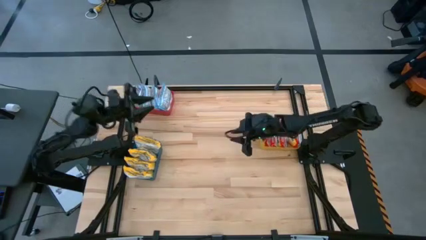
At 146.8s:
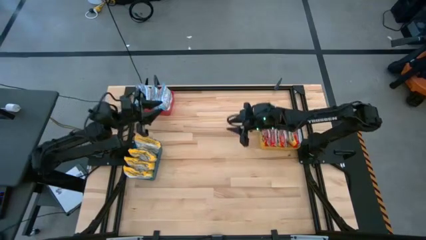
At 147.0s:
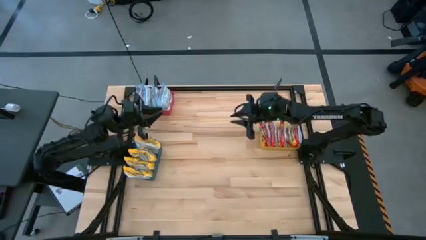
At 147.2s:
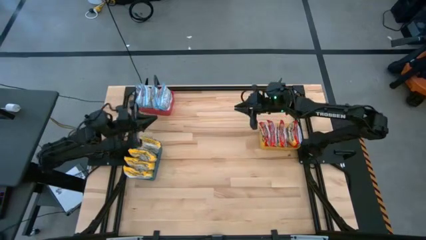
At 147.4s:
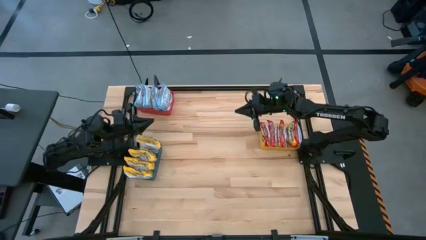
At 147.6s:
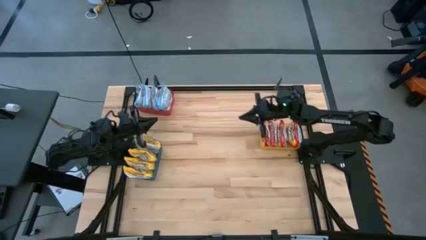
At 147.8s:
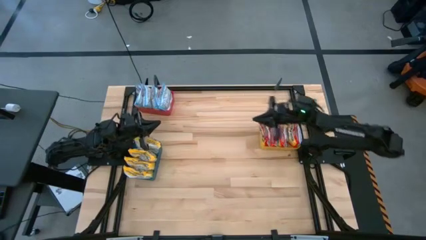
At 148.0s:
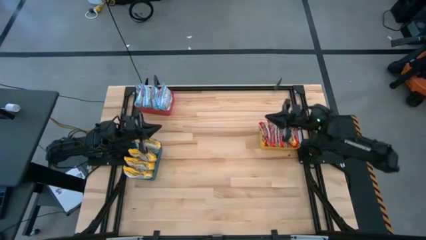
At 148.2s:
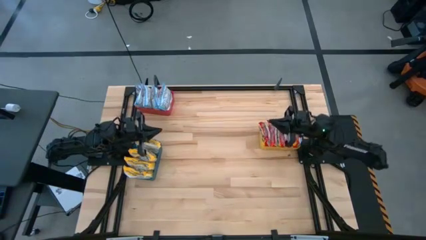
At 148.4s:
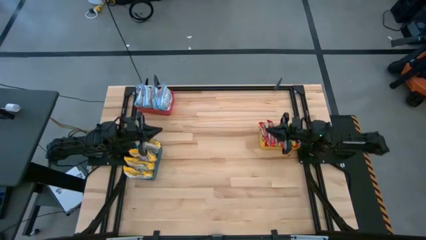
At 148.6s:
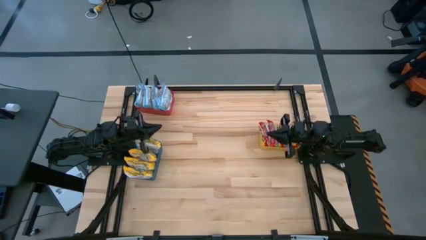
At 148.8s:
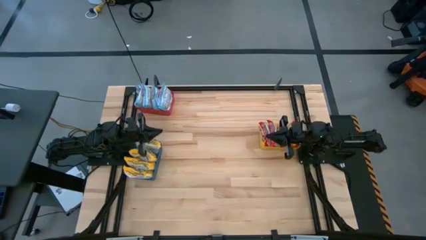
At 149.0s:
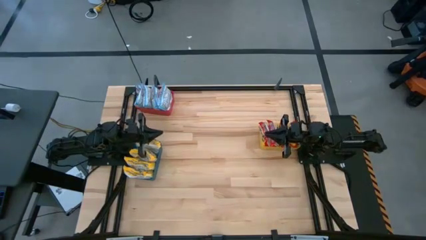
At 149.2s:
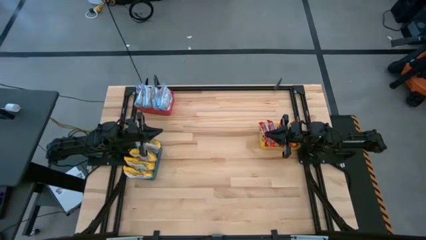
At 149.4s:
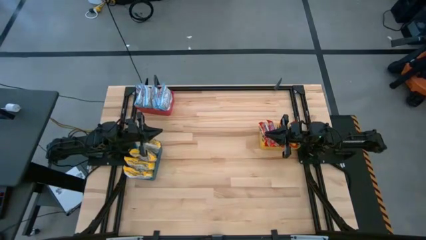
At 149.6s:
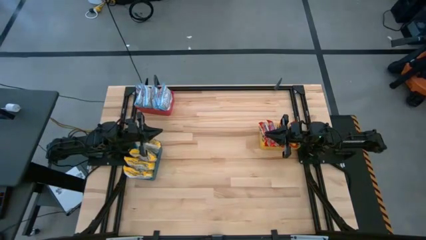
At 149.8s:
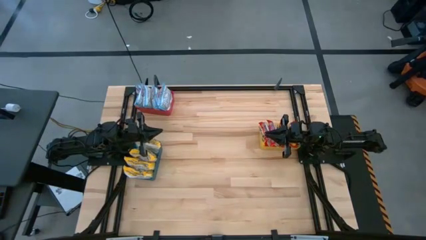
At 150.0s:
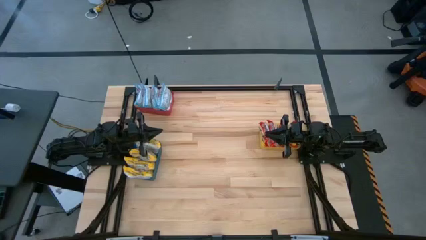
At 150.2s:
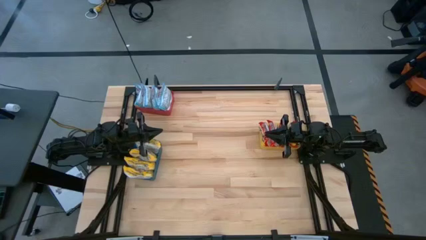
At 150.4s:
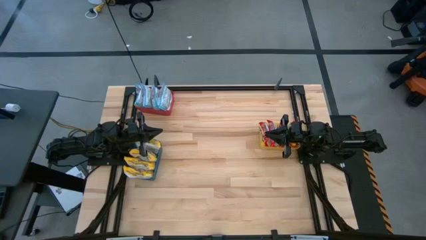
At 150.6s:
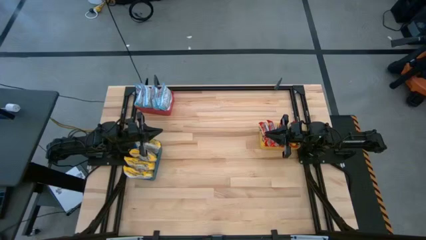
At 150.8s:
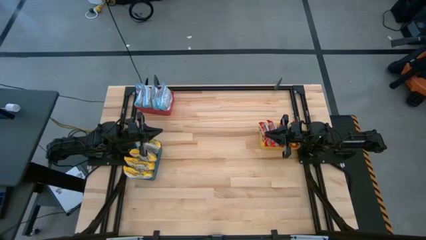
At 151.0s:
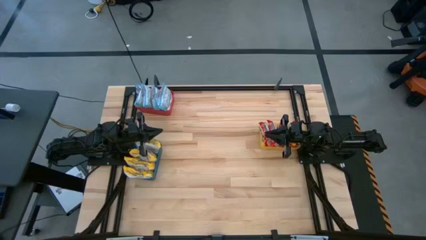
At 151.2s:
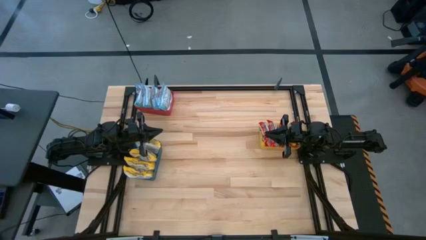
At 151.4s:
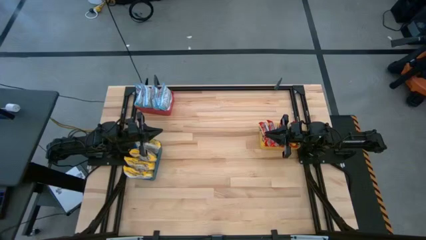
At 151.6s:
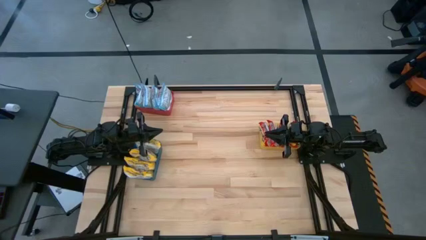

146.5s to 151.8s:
Task: Sort Maruchan noodles
Return to Home Position

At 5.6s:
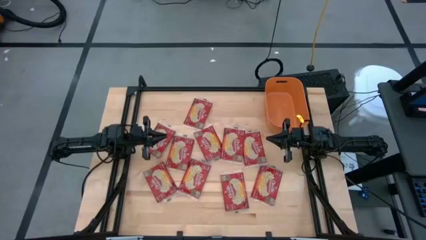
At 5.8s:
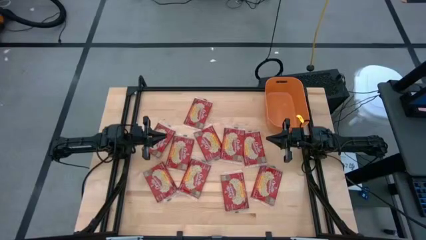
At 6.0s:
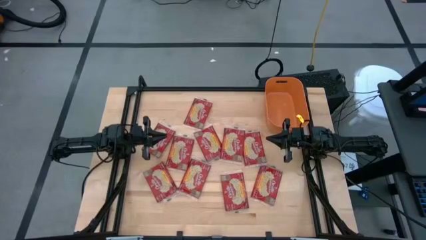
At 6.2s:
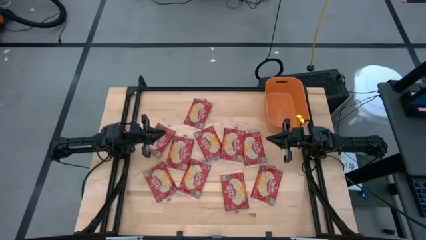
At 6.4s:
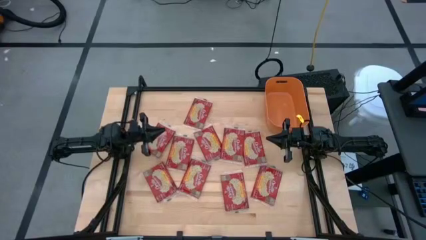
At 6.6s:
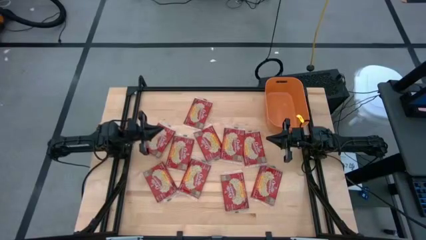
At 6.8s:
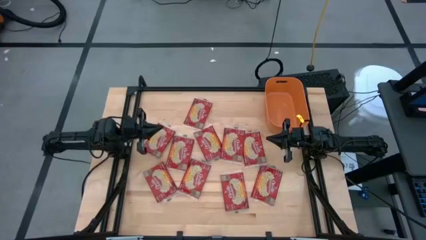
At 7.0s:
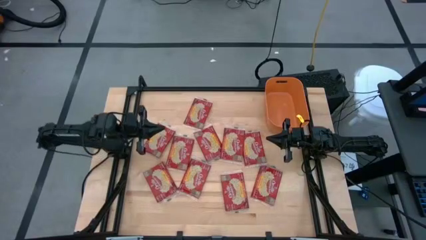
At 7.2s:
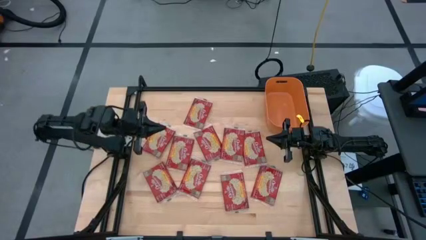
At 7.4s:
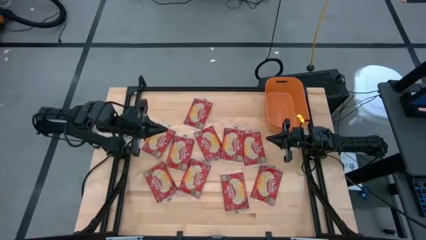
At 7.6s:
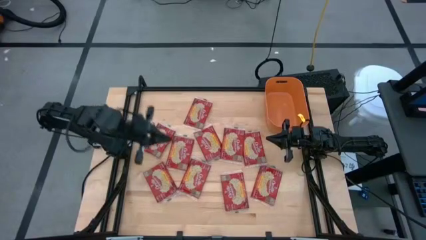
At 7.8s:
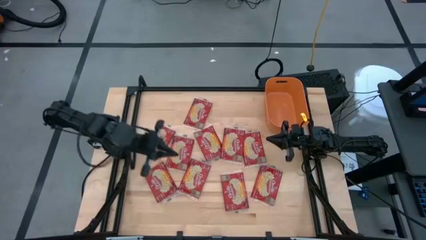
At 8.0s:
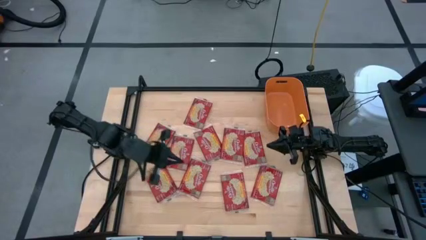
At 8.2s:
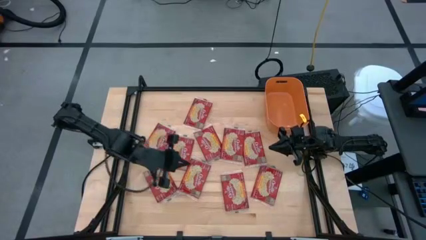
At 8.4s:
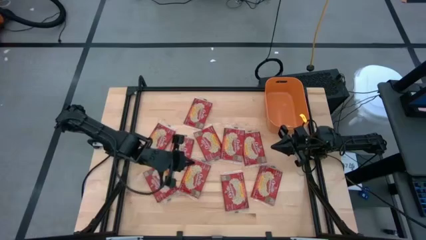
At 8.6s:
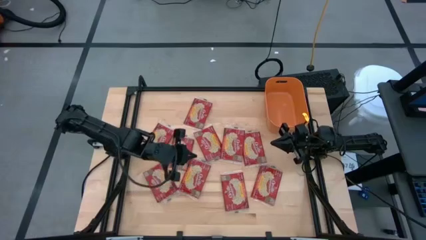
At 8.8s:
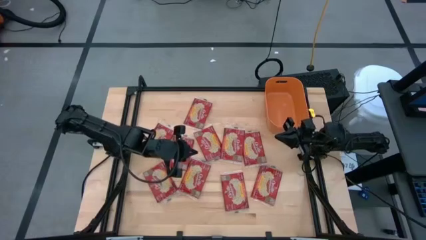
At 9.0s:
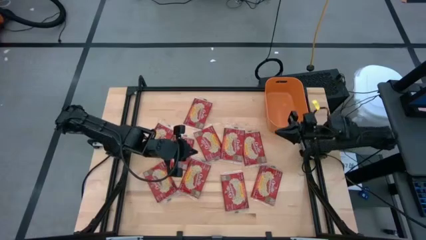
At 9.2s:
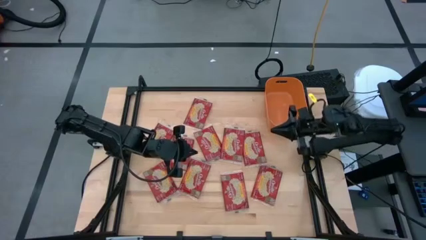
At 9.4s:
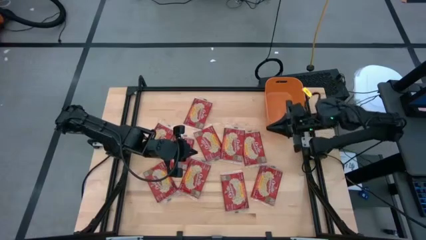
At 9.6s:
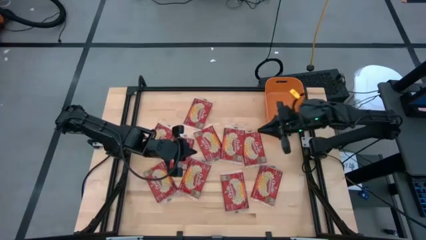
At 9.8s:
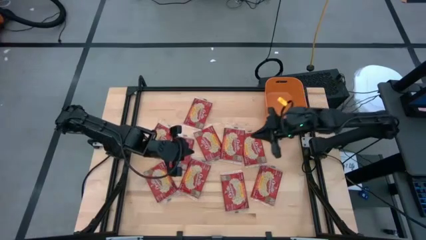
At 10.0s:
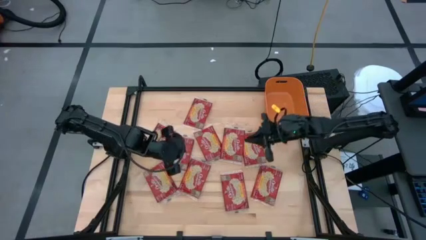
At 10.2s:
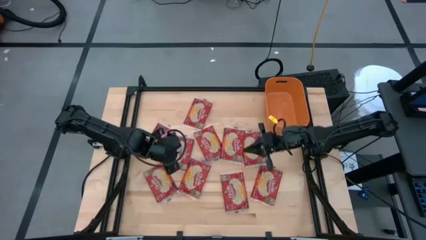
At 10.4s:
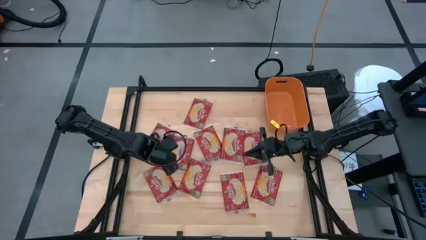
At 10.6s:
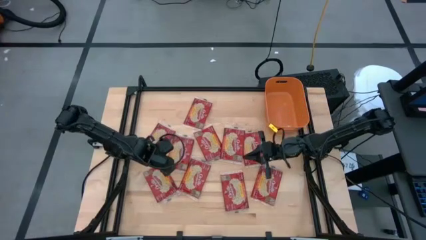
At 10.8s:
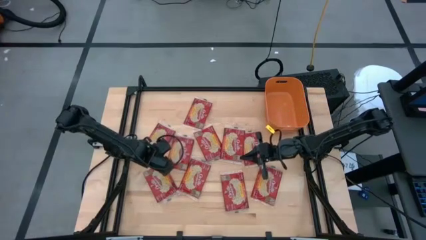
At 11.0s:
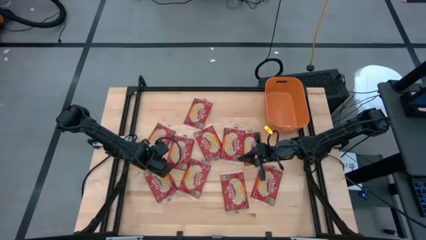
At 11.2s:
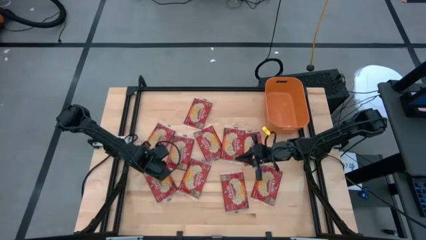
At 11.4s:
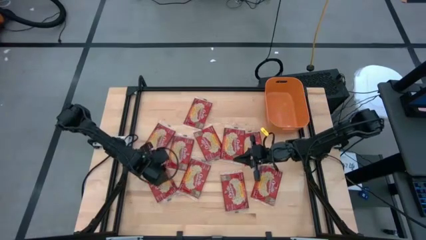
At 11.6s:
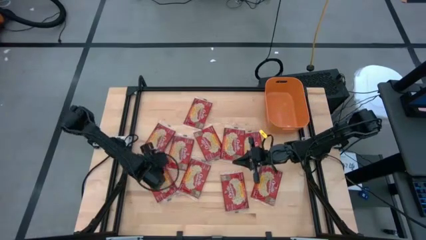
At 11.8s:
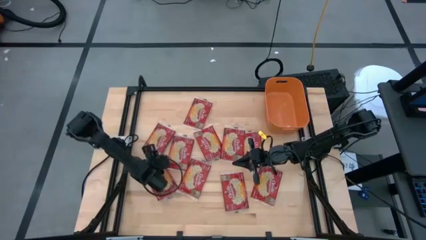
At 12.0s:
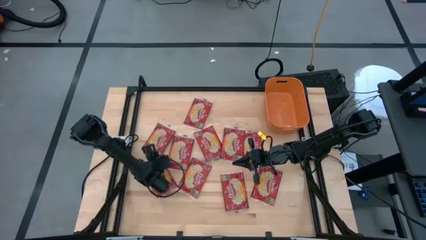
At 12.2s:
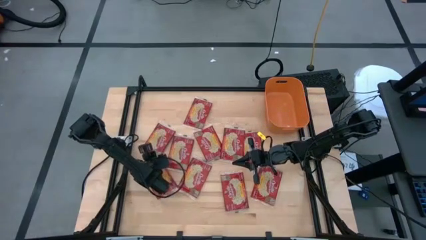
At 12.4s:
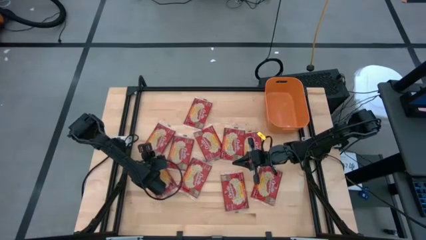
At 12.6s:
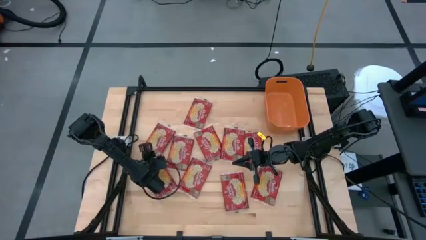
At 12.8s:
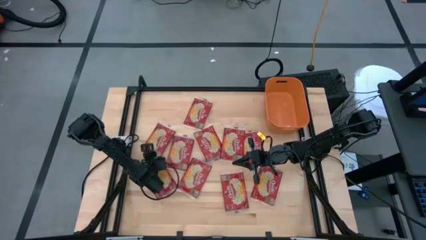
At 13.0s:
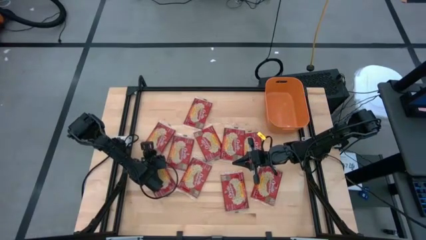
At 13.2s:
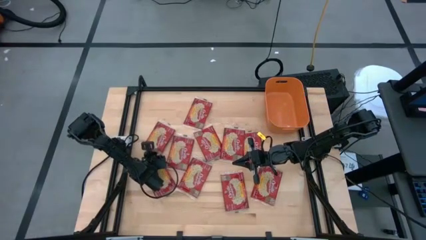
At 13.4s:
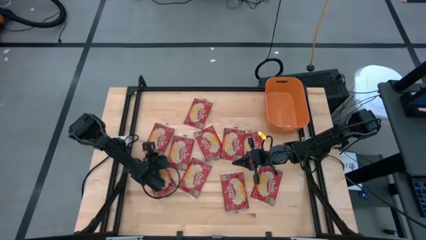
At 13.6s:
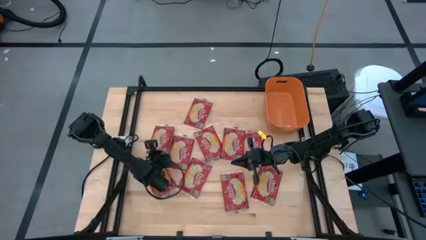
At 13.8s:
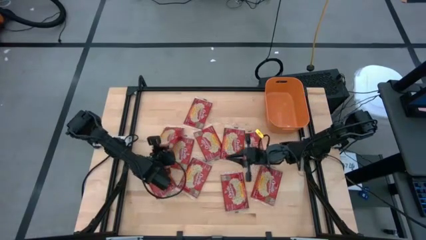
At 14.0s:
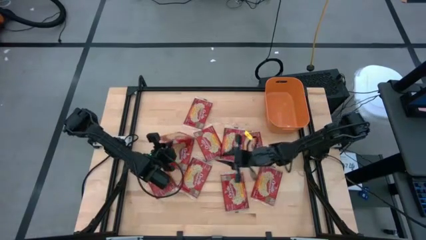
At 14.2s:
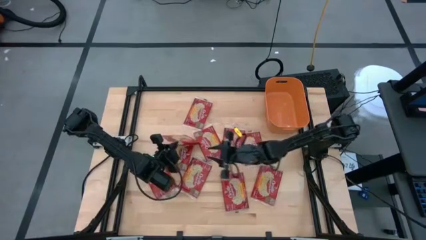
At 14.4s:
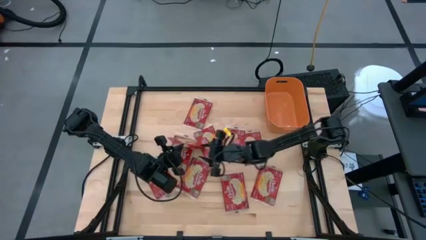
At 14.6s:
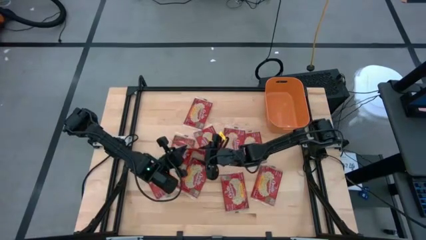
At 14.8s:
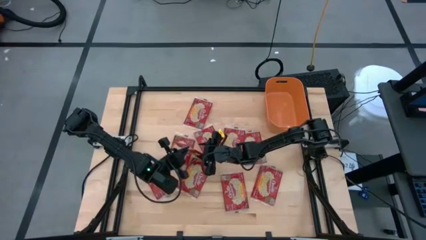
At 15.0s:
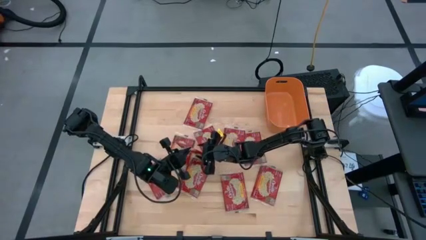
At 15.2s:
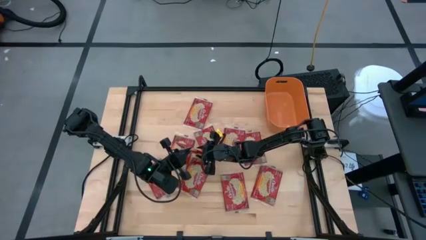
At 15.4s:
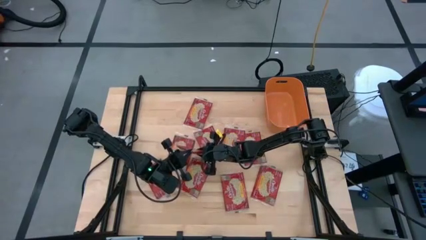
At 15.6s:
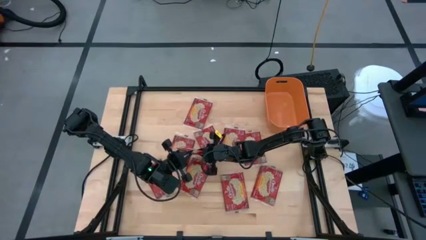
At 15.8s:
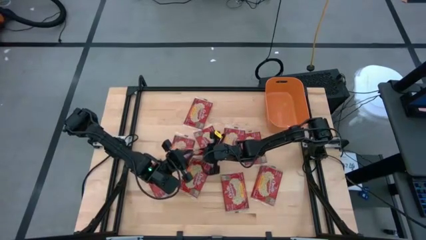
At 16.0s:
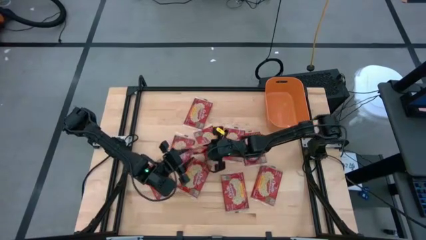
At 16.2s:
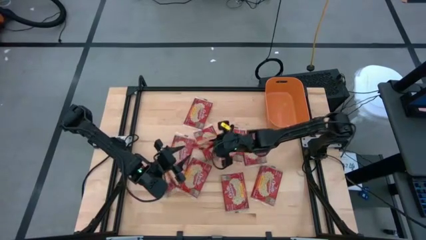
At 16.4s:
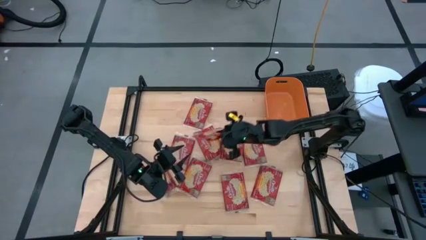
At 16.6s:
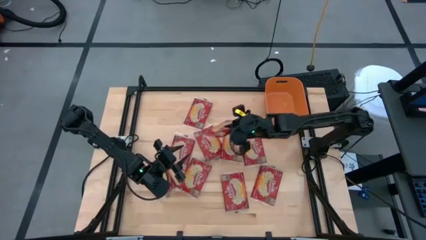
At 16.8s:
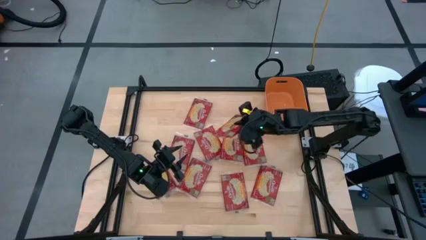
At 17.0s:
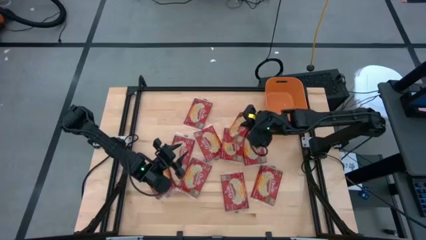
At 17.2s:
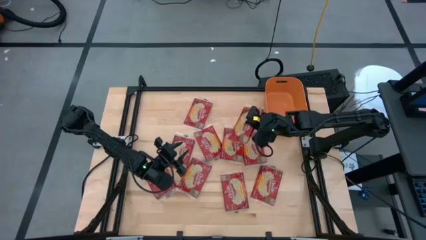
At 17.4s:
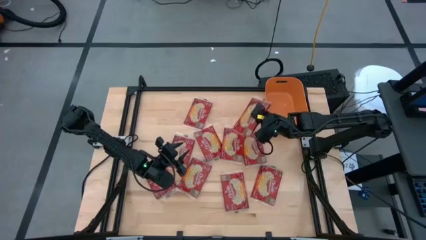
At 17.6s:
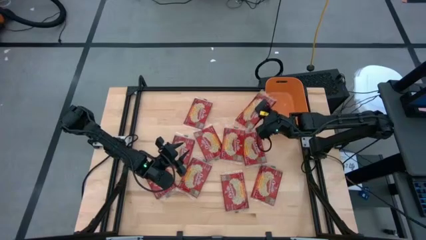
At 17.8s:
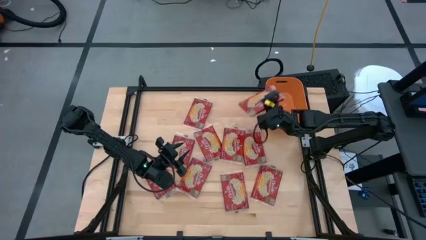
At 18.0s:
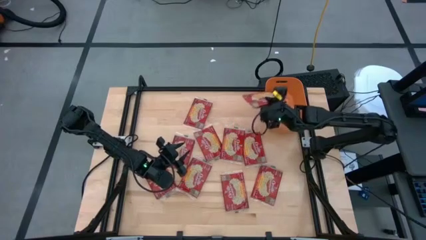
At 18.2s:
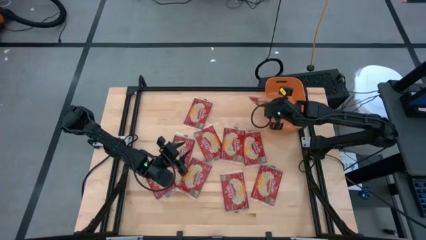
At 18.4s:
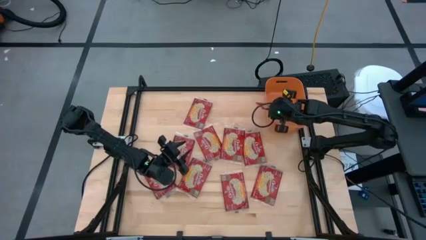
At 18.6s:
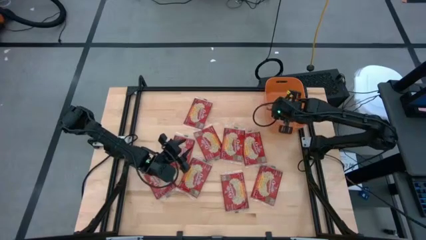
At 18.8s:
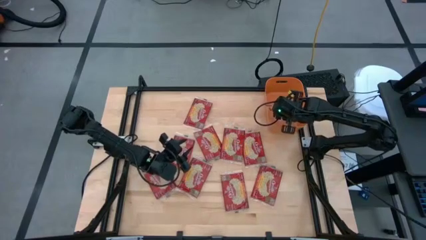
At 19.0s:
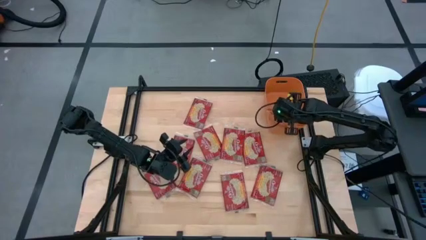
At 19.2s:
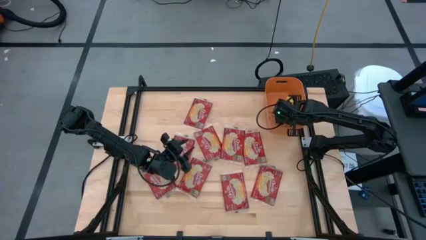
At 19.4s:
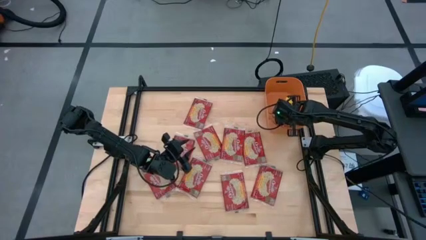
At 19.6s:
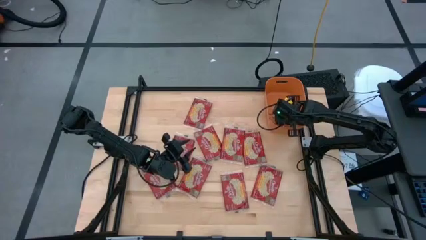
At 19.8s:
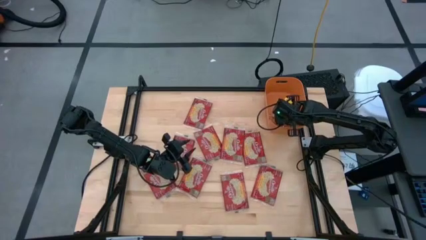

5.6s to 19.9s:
Task: Sort popcorn bags into baskets
Put the red popcorn bag into the orange container
